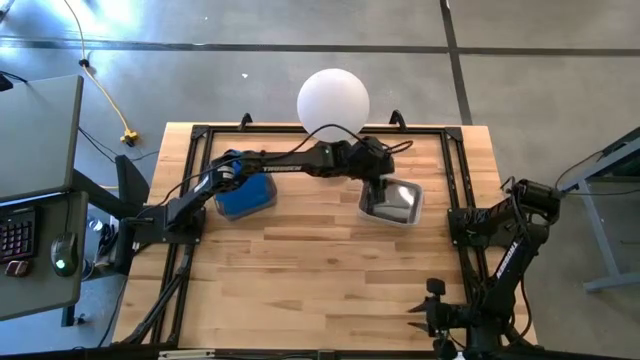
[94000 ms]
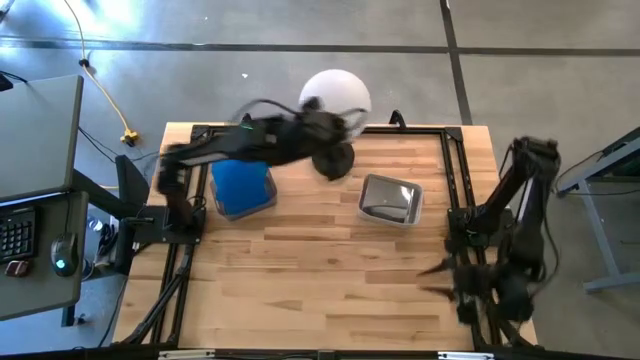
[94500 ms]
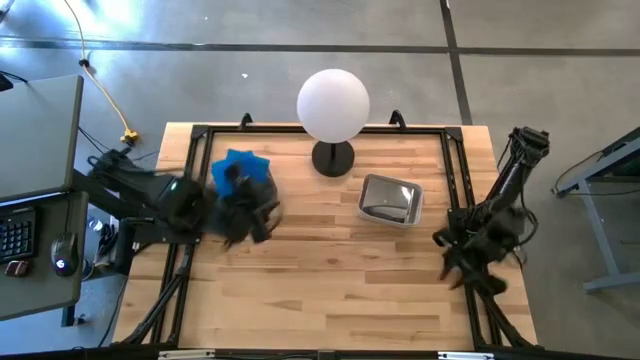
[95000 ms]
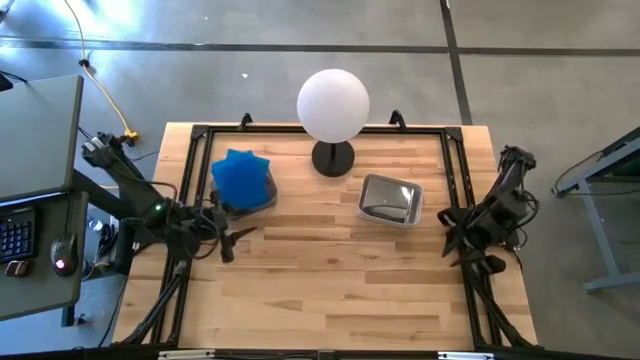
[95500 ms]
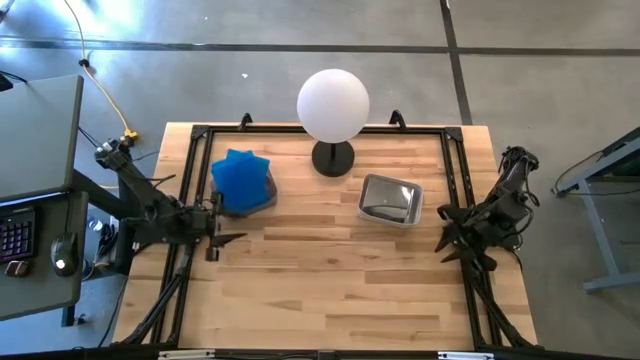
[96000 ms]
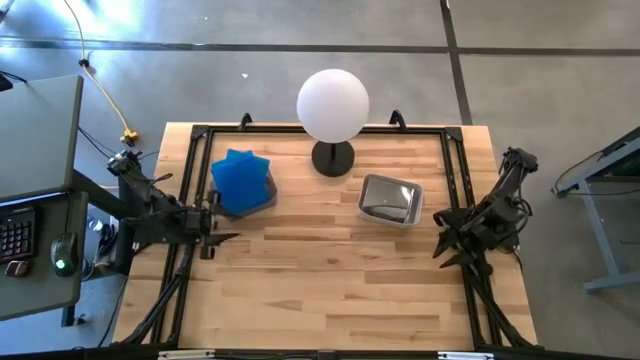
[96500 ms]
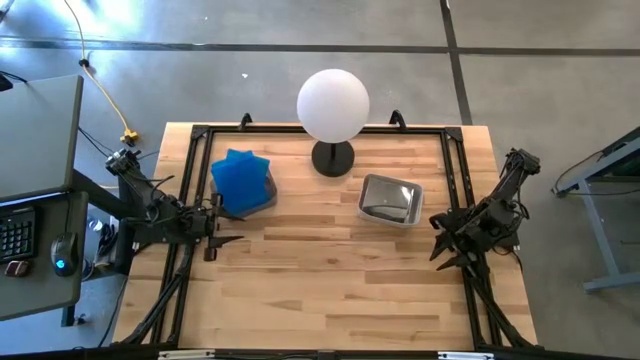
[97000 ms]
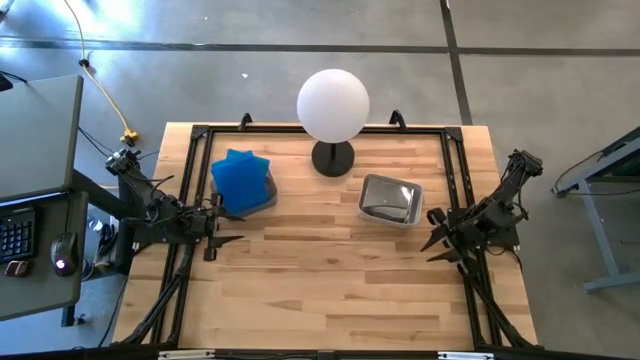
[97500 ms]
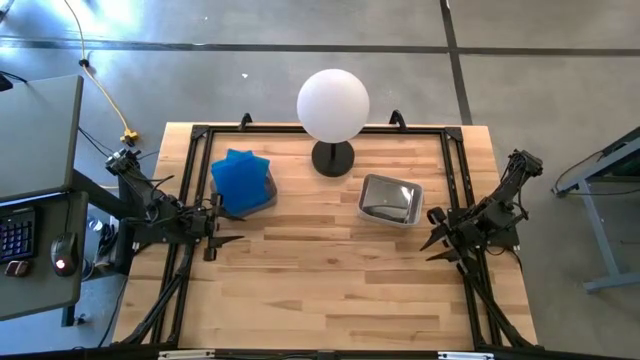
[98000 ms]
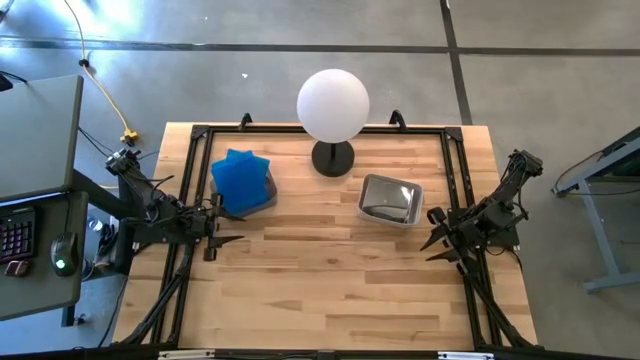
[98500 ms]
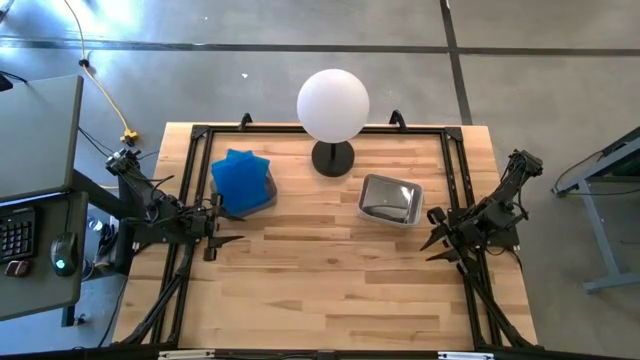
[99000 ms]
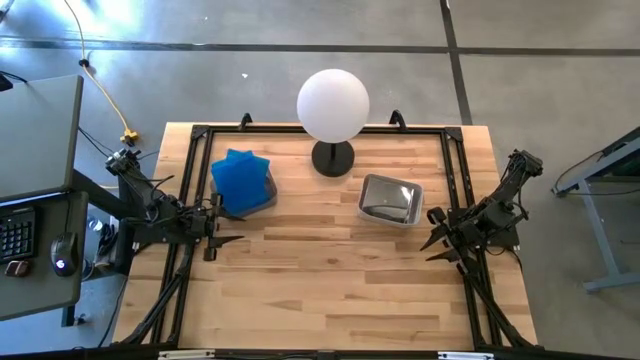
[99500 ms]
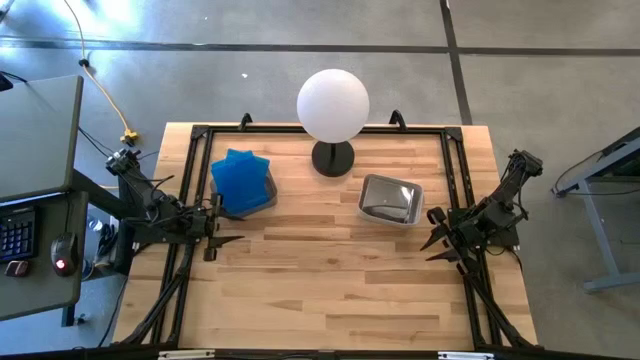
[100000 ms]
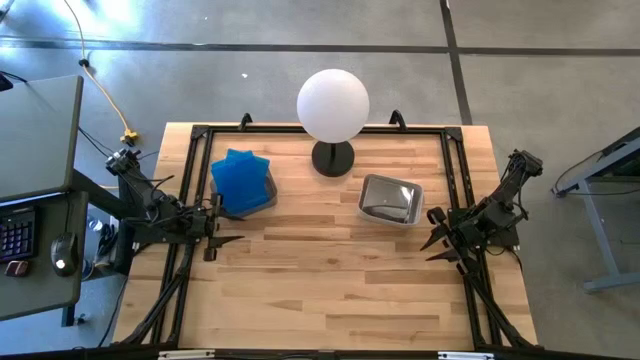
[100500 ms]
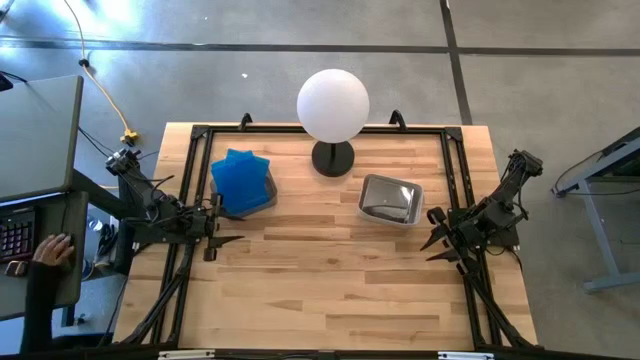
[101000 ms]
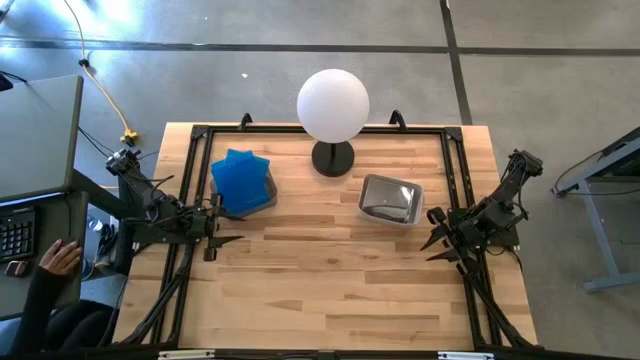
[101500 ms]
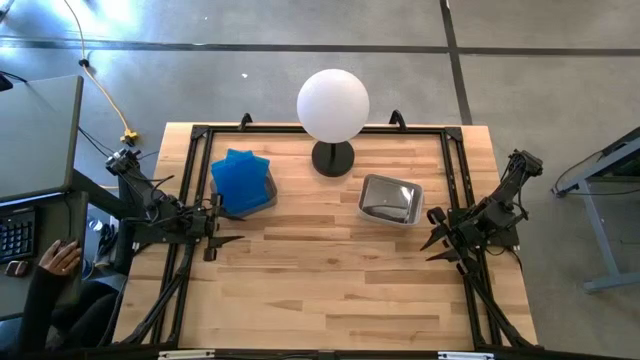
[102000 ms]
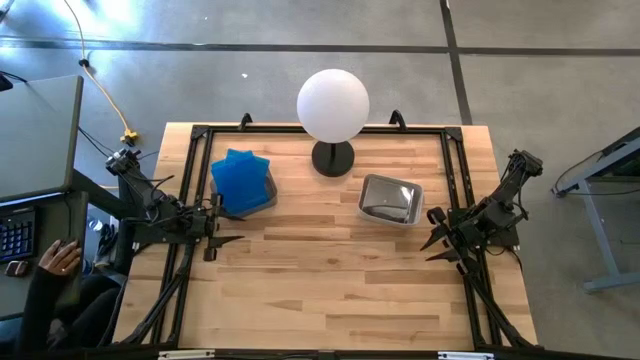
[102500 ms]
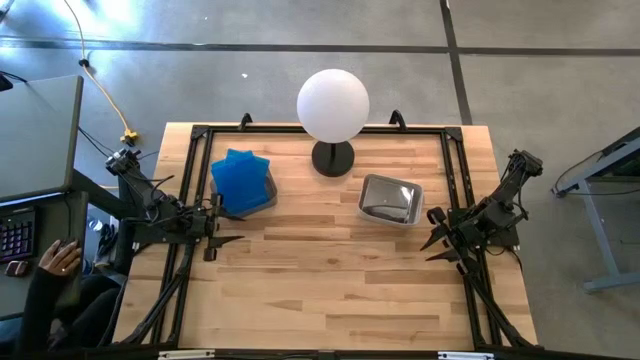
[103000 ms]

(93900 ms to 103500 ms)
Task: Pick & place jewel cases by type
Return to Home Position

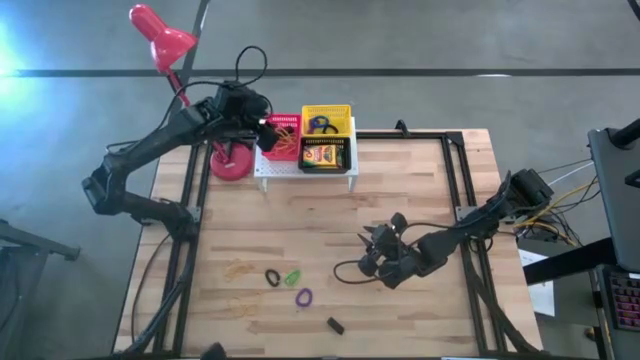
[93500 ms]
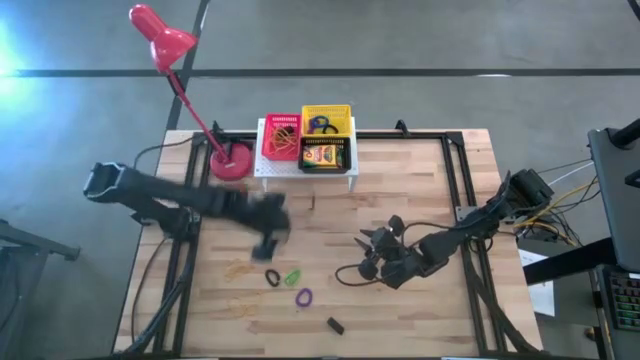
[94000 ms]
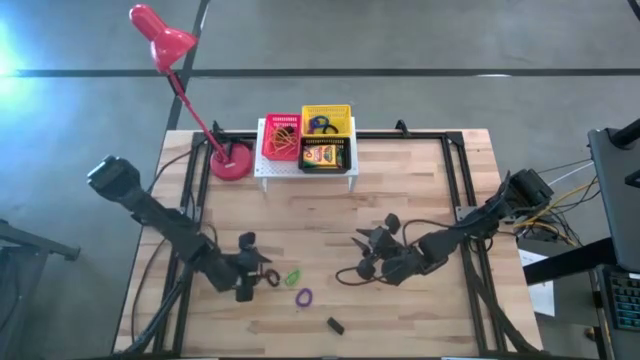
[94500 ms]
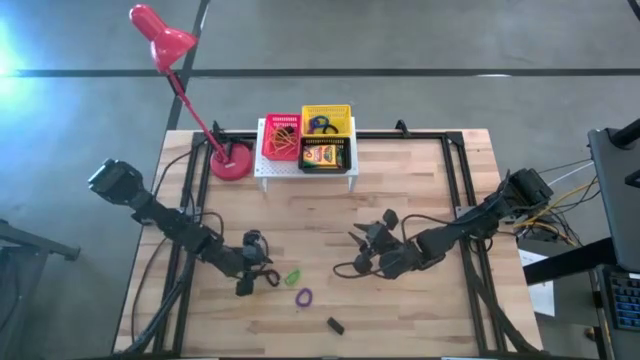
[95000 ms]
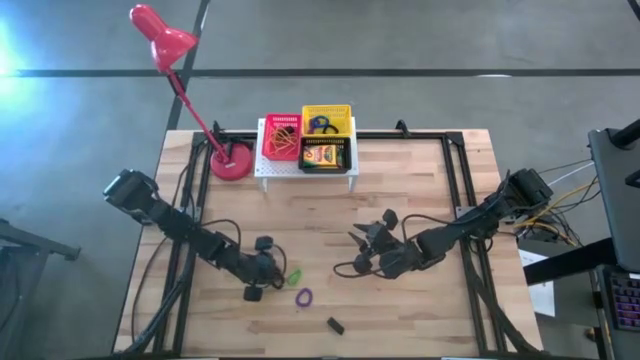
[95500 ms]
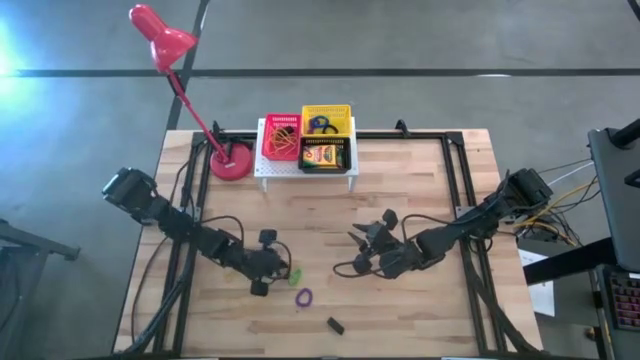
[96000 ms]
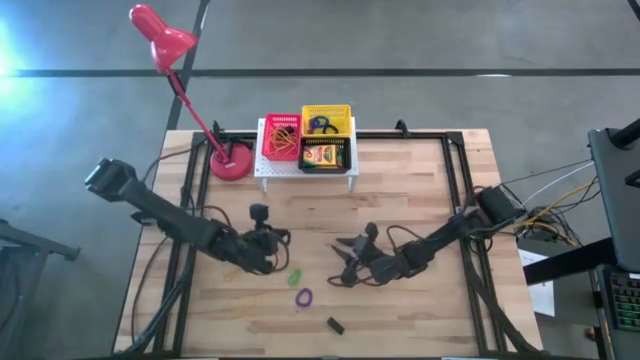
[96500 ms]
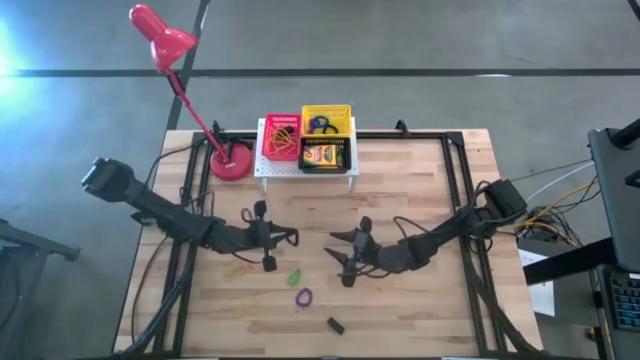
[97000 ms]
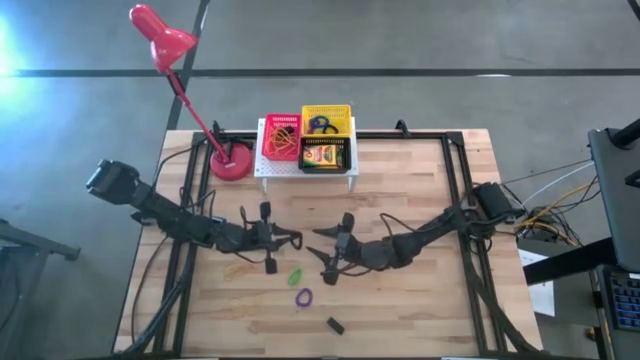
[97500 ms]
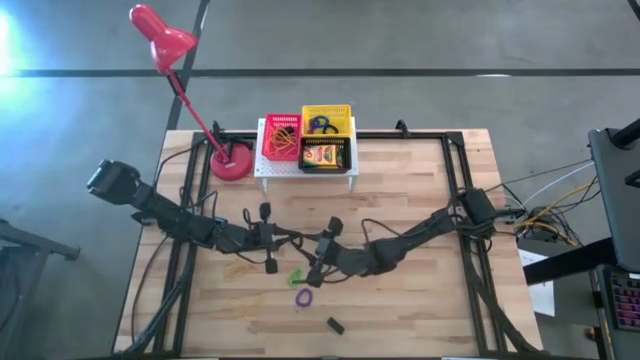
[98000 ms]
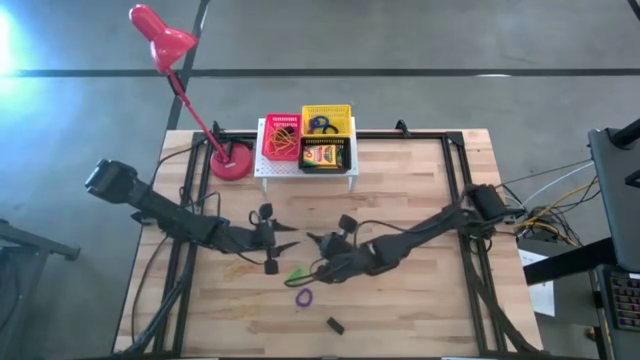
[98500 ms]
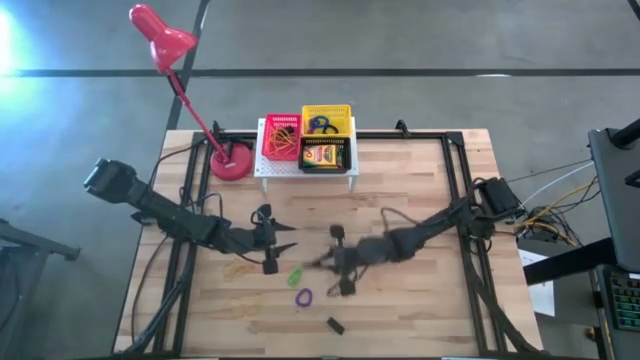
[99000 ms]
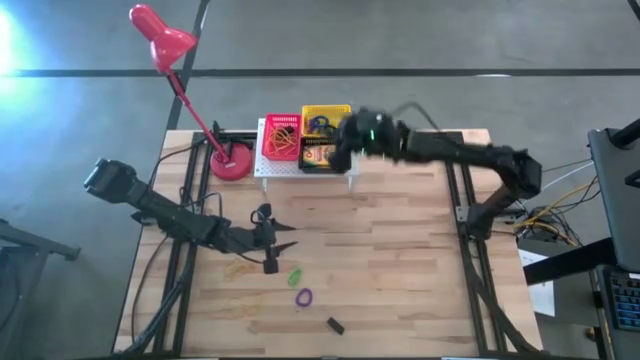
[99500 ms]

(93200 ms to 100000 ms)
Task: Pick & Place Office Desk Supplies
Put the black spring keychain into the yellow bin on the shelf

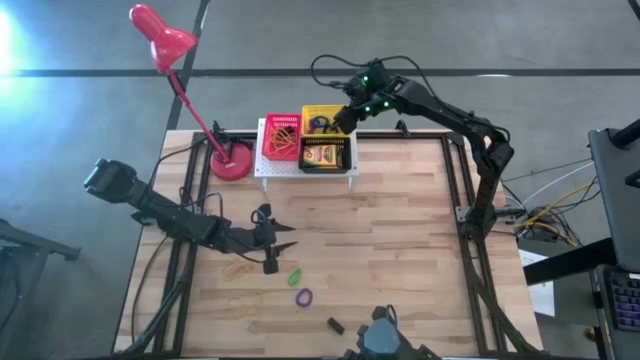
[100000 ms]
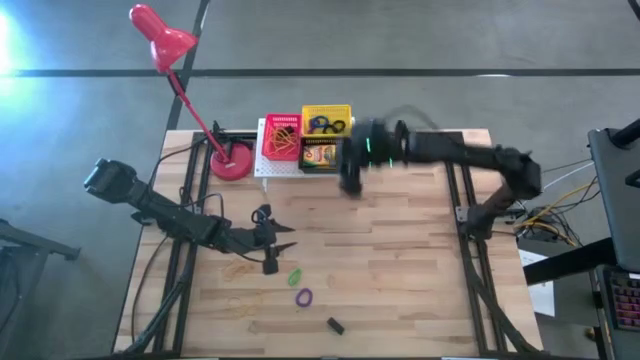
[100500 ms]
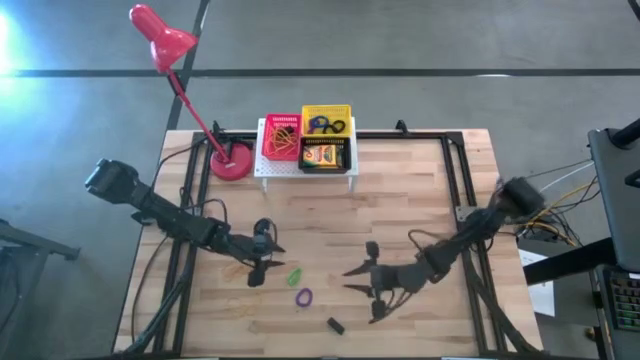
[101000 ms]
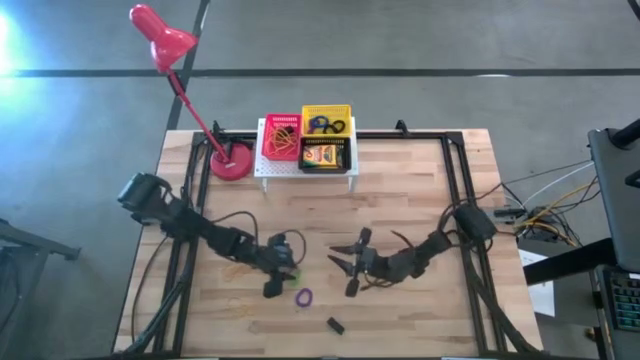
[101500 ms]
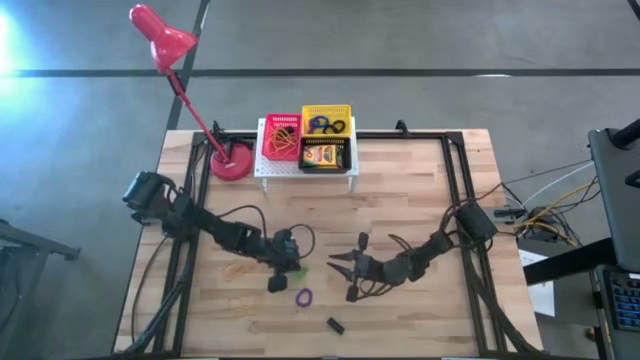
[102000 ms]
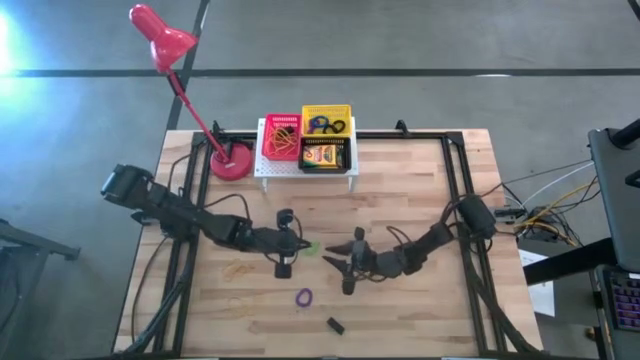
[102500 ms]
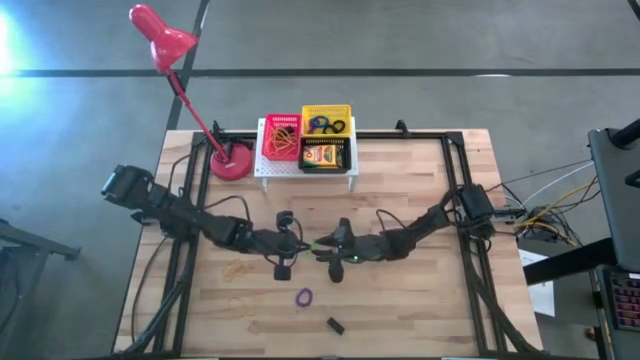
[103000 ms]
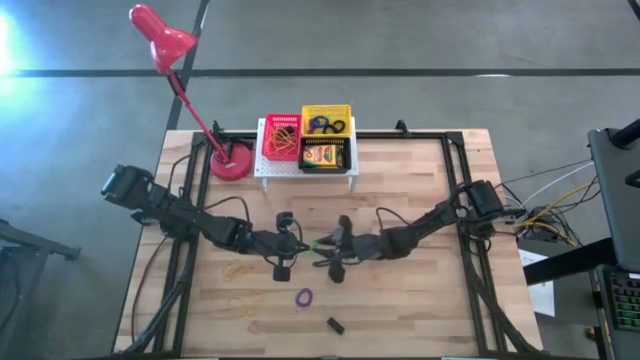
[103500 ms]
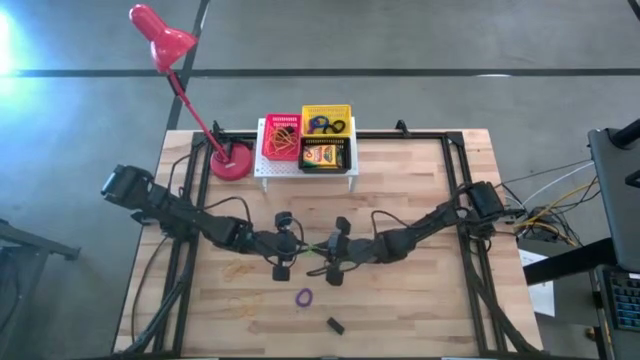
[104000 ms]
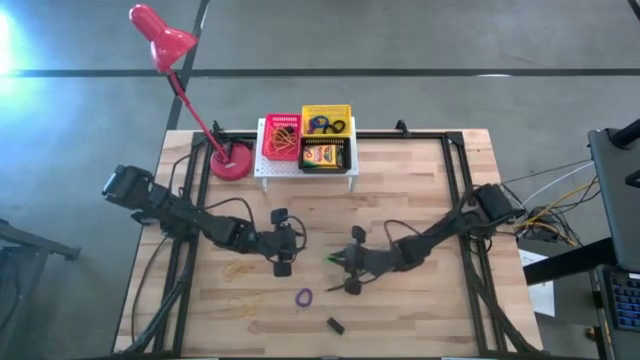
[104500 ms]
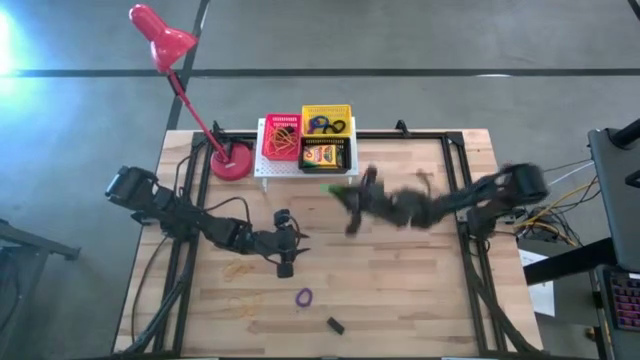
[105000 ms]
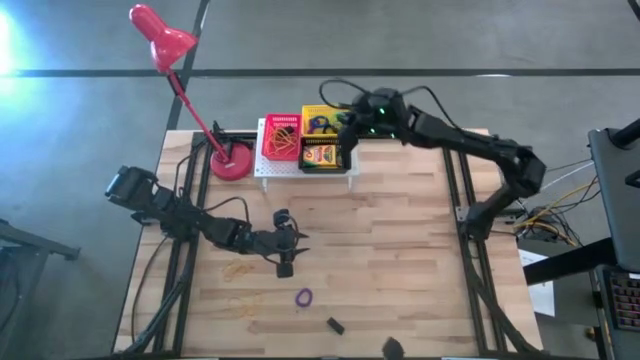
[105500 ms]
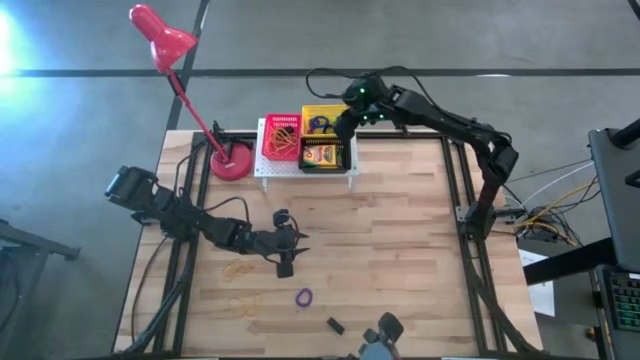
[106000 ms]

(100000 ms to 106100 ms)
Put the green spring keychain into the yellow bin on the shelf
